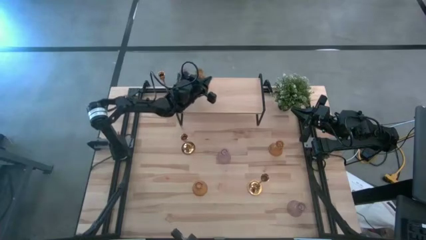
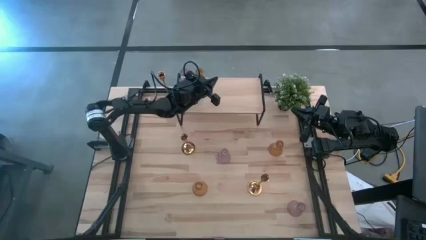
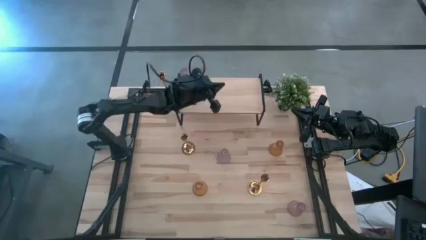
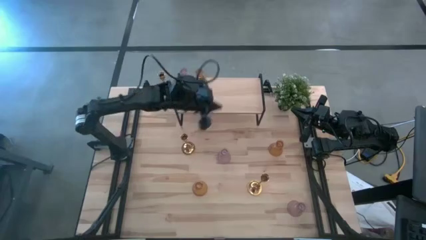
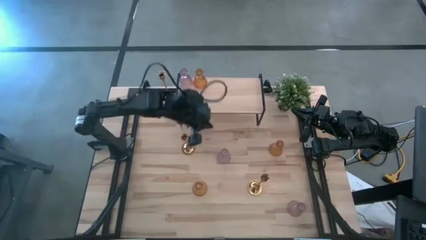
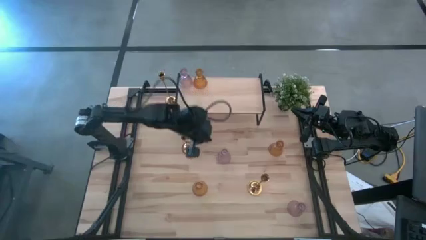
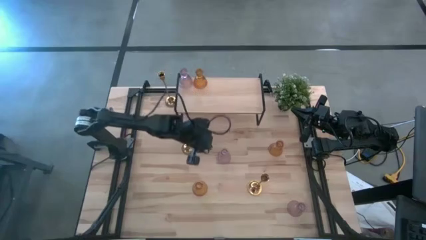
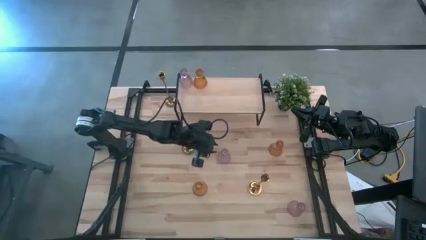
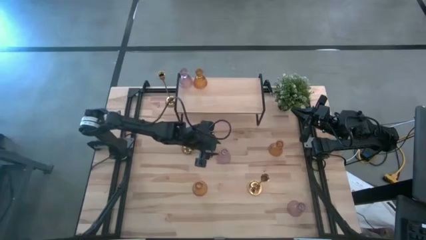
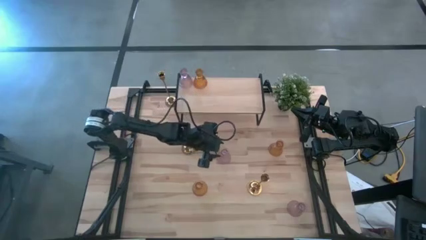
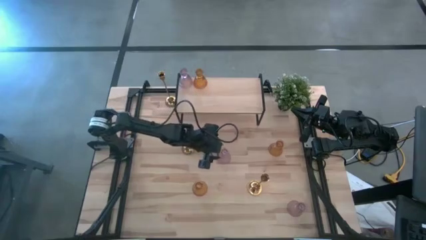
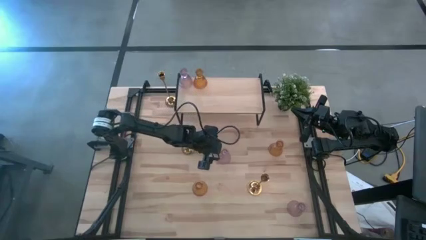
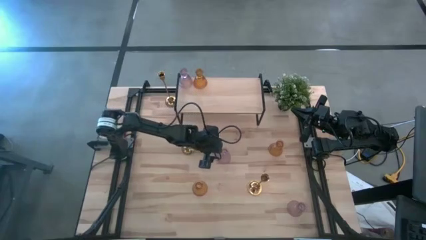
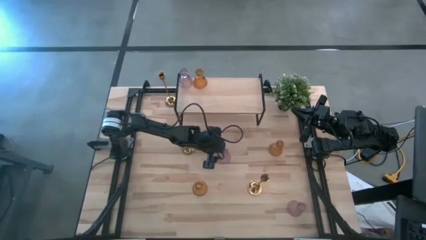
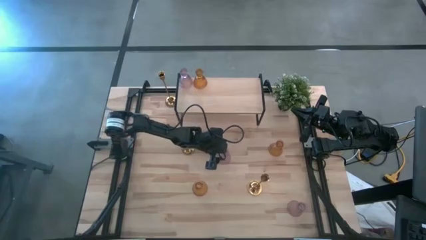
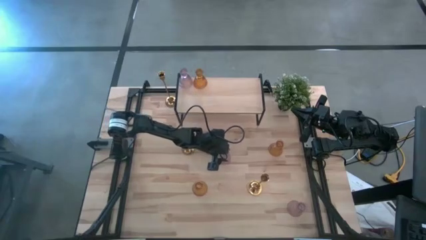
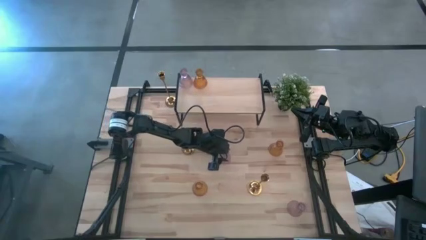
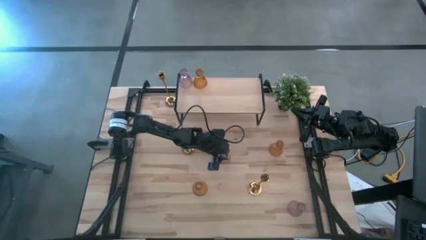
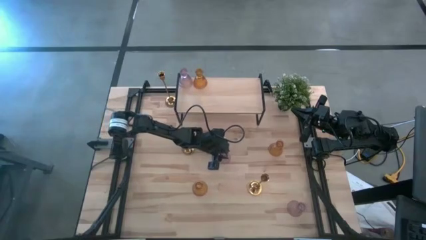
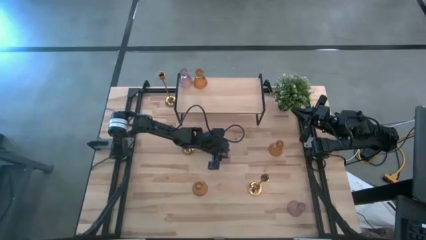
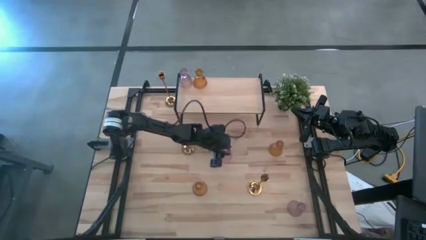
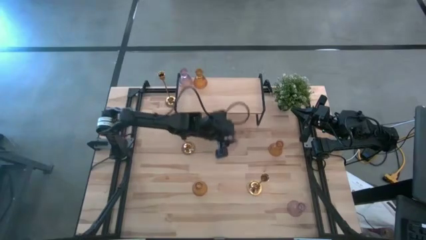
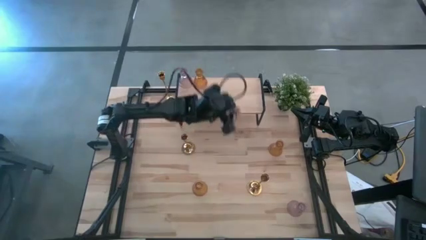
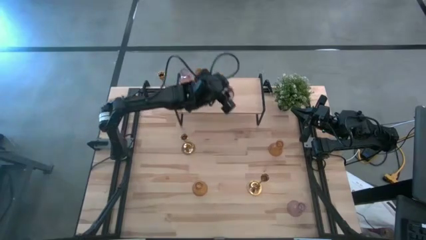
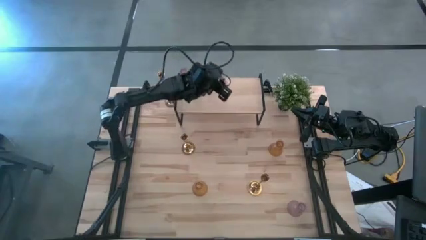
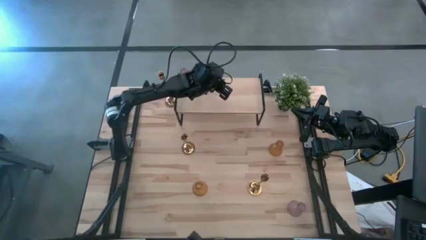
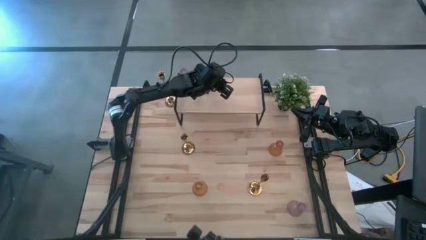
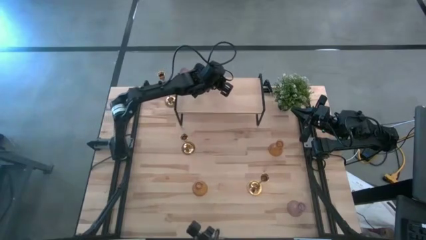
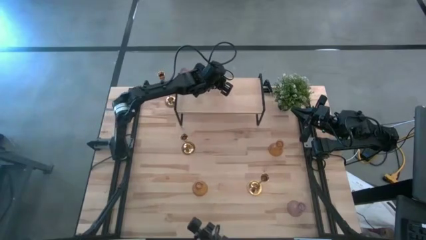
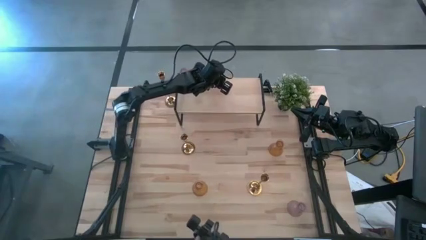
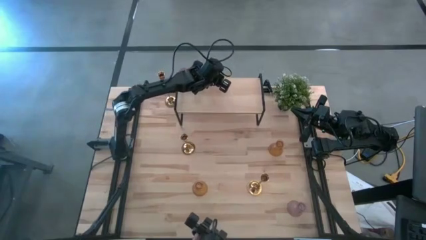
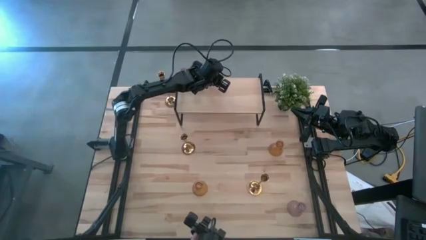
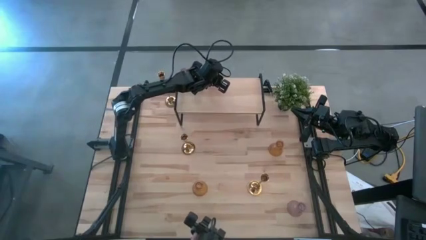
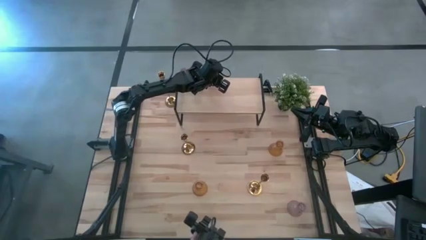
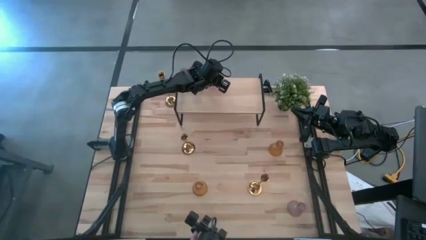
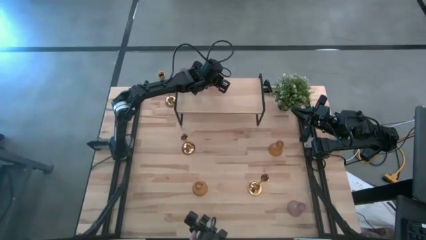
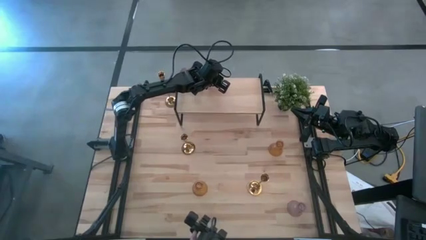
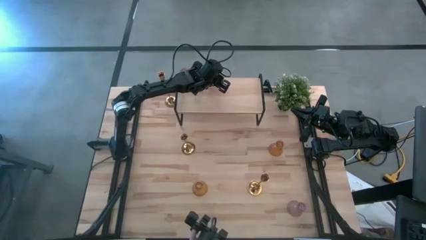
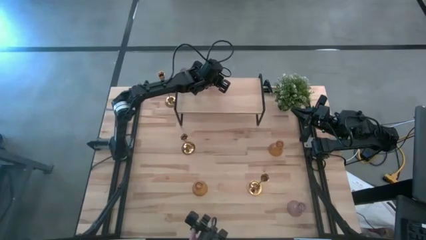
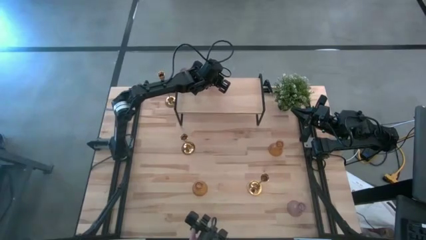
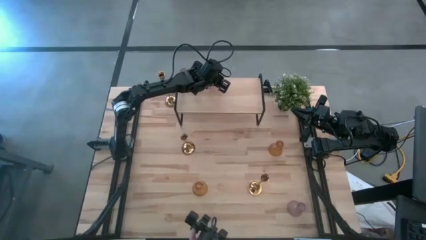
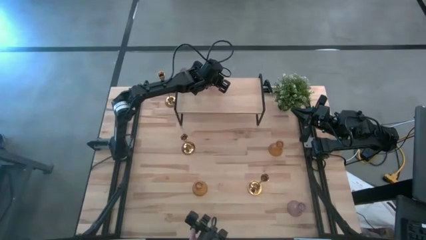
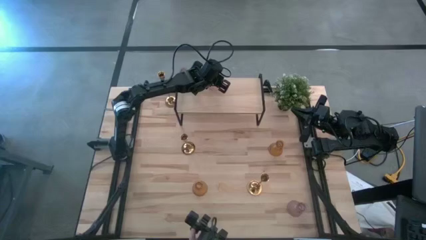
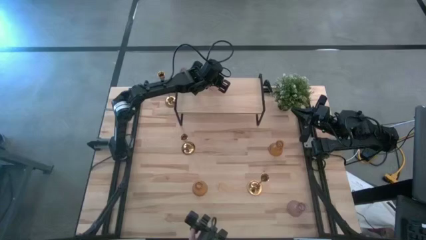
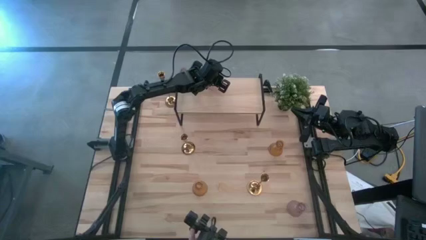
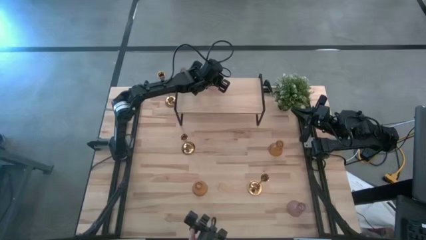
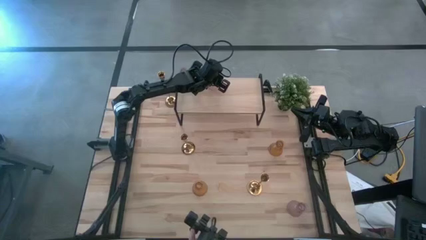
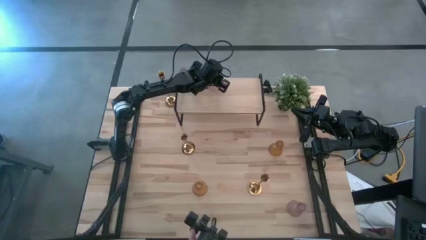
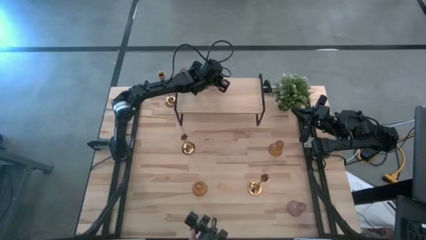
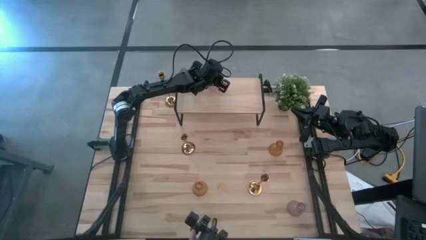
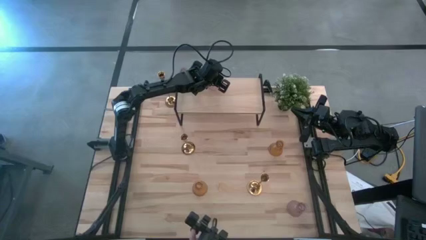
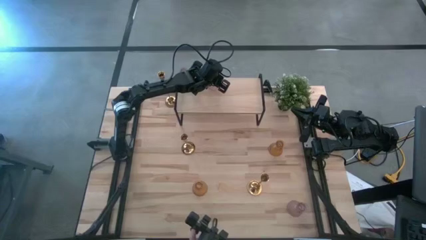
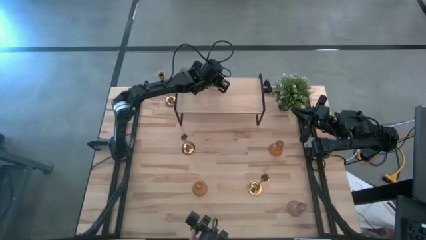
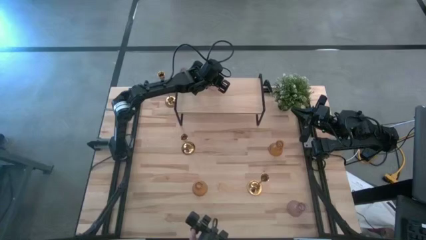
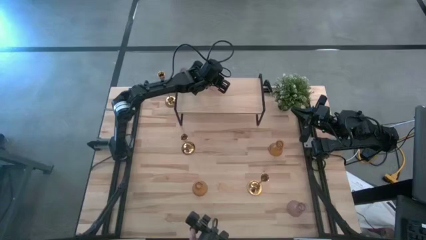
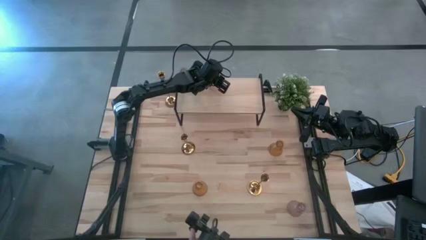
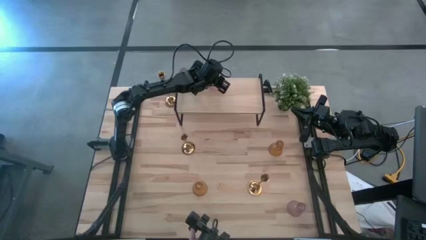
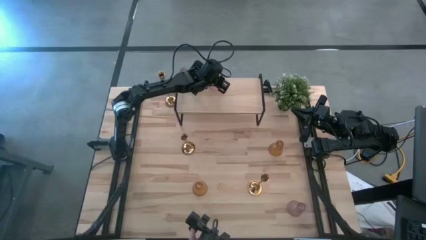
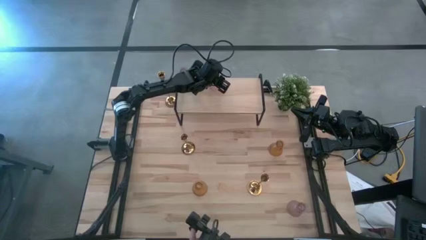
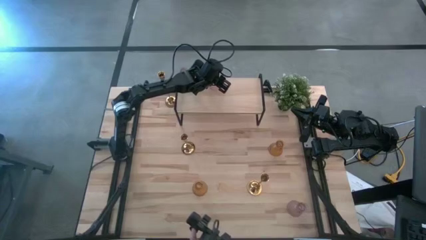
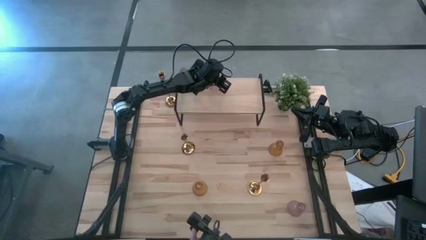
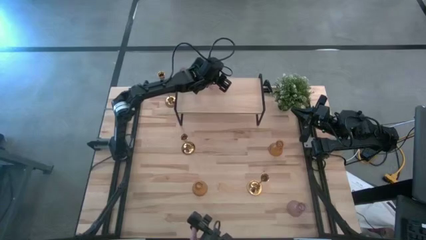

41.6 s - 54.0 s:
Task: Pick & Place candle stick holders
Put the top purple glass candle holder on the shelf aligned with the other glass candle holders

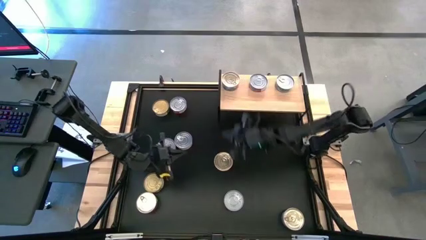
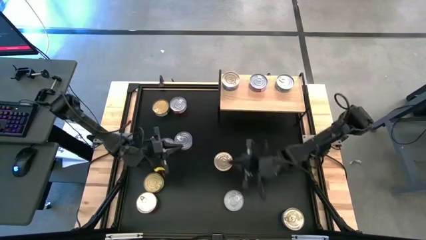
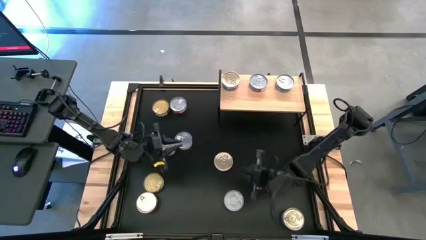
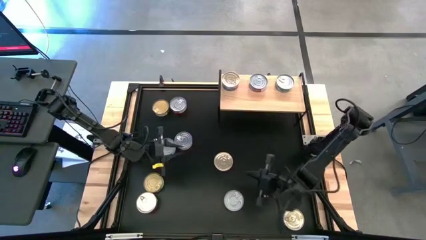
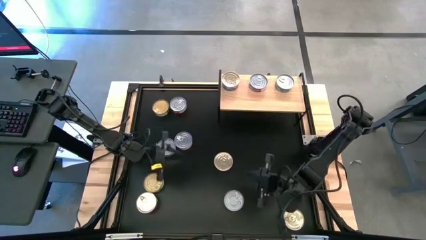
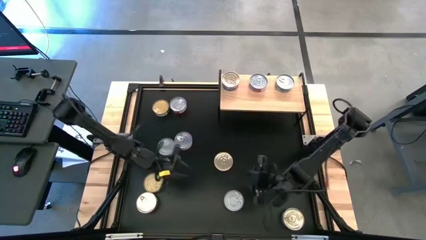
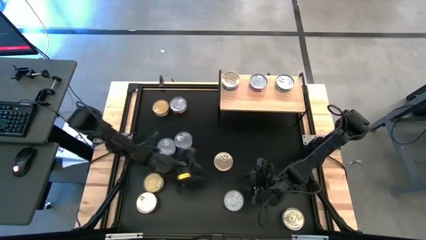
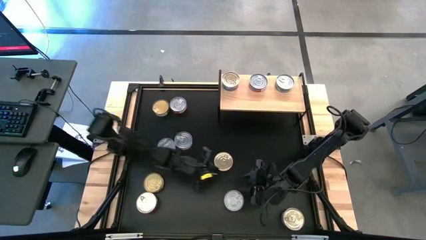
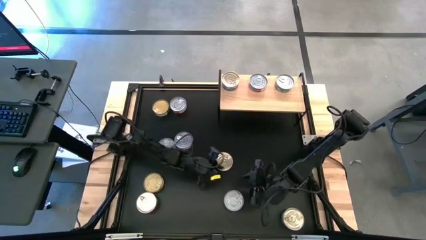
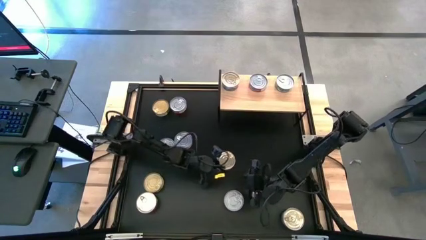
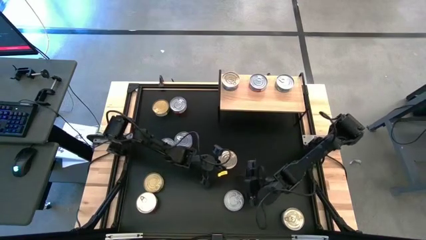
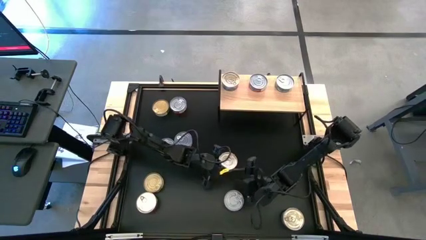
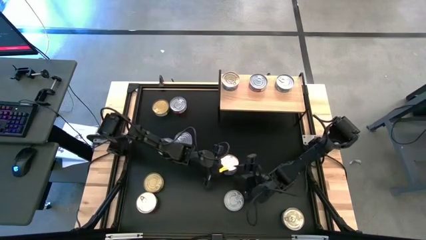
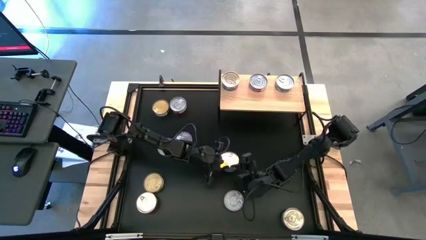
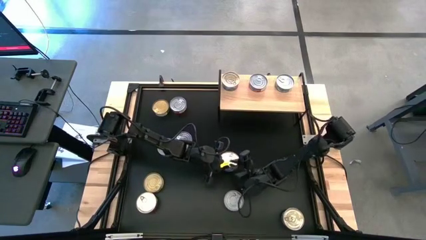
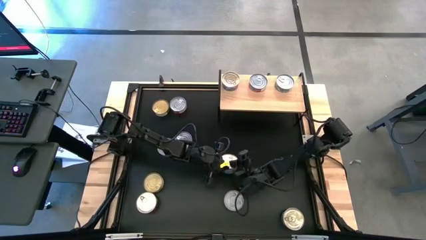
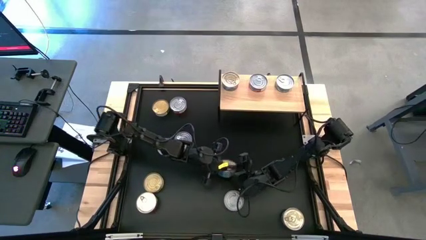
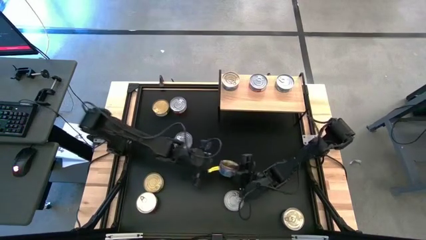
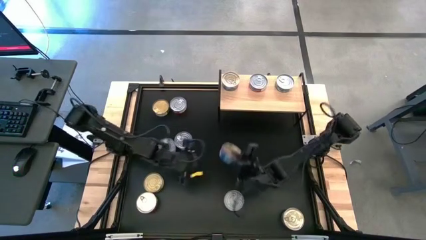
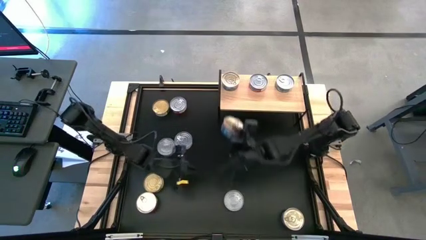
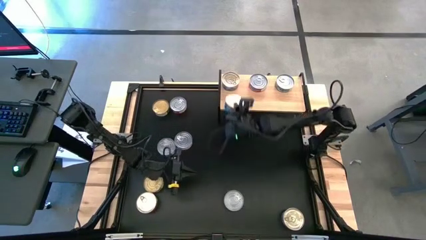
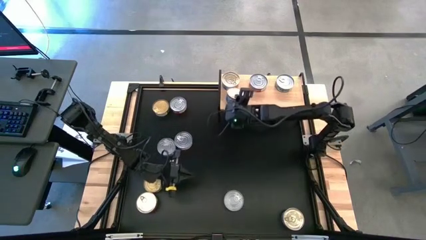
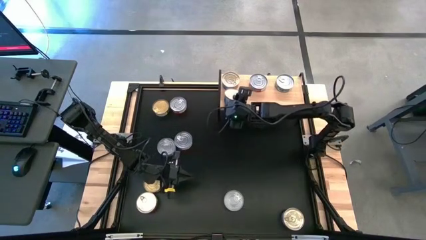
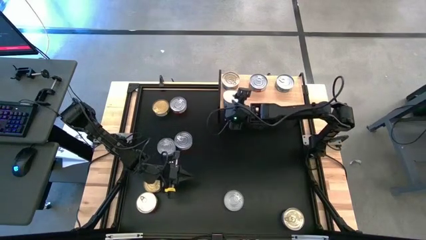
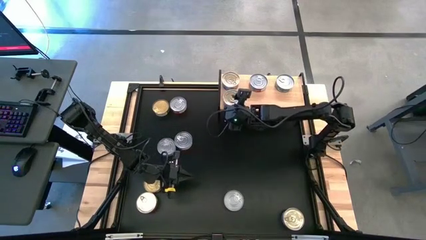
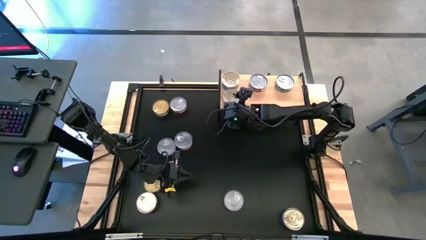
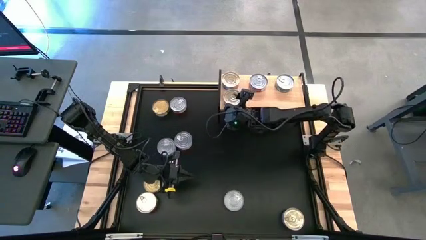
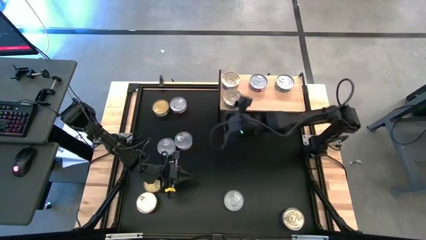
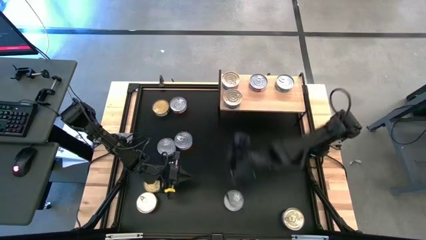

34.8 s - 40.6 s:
Task: Stack canned seafood by type on shelf
Put the blue tuna can on the shelf aligned with the other blue tuna can
